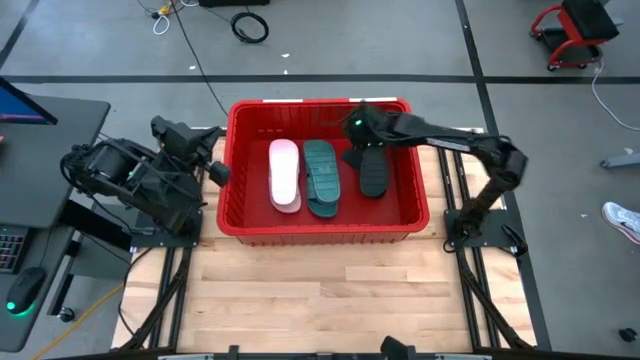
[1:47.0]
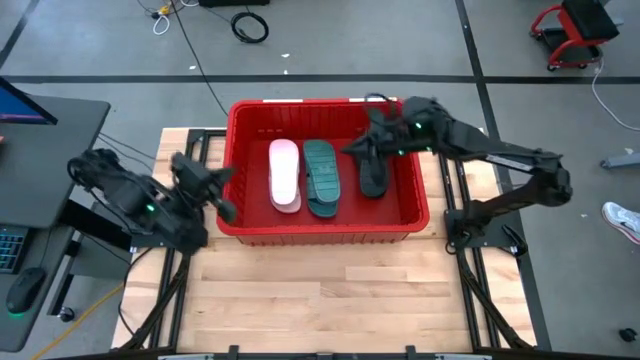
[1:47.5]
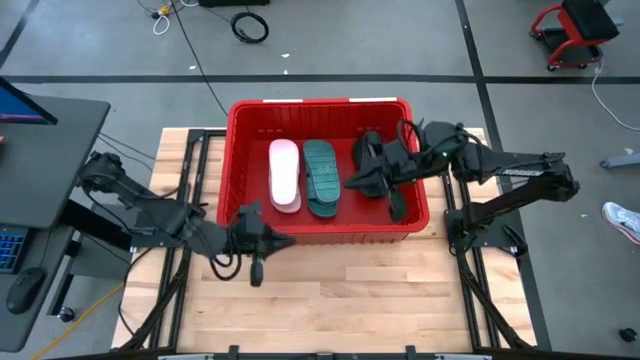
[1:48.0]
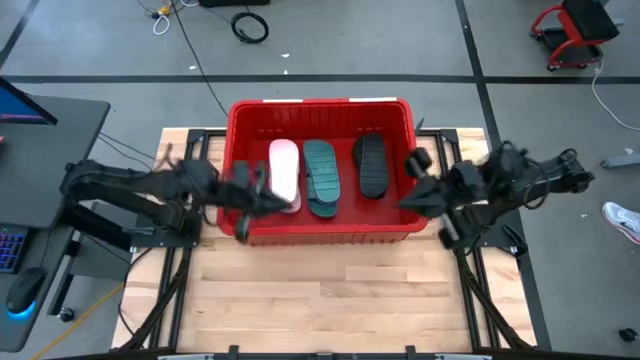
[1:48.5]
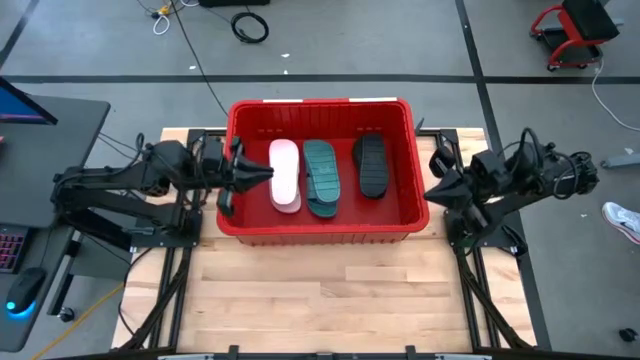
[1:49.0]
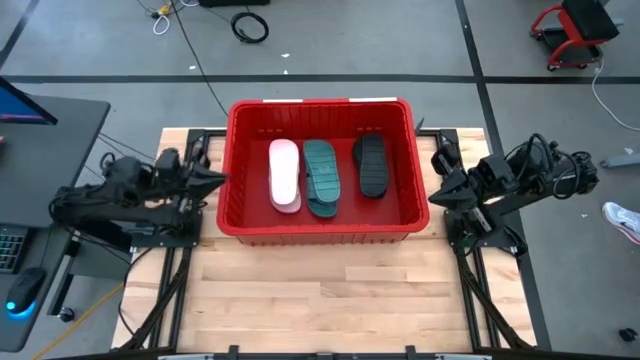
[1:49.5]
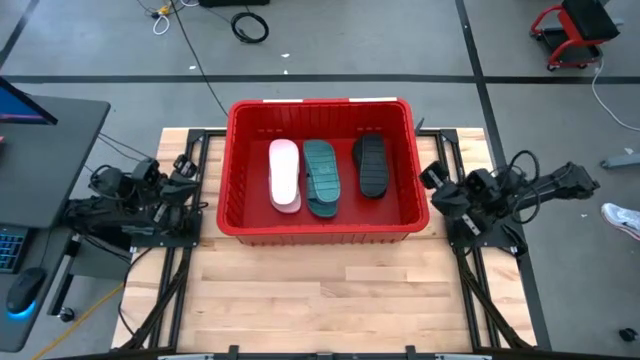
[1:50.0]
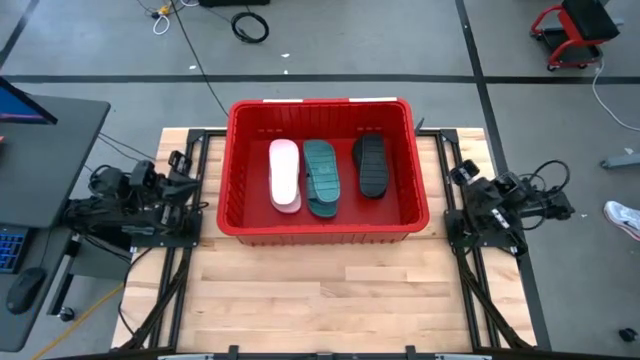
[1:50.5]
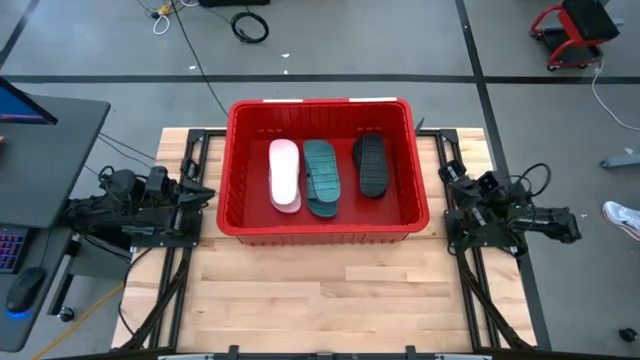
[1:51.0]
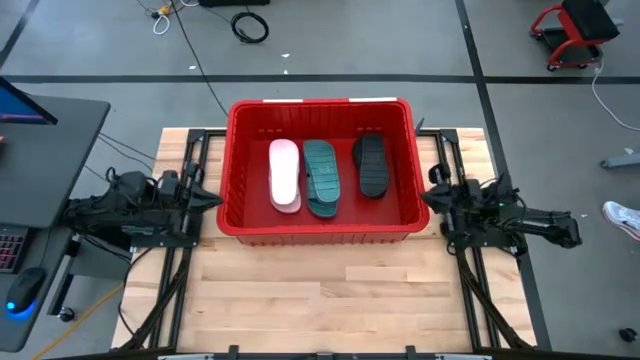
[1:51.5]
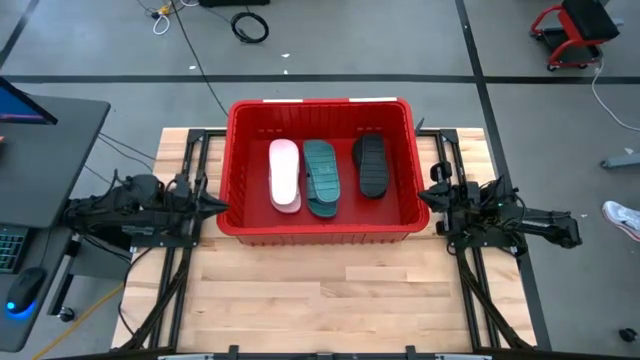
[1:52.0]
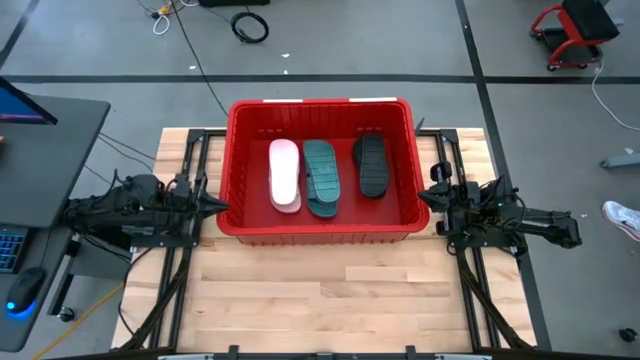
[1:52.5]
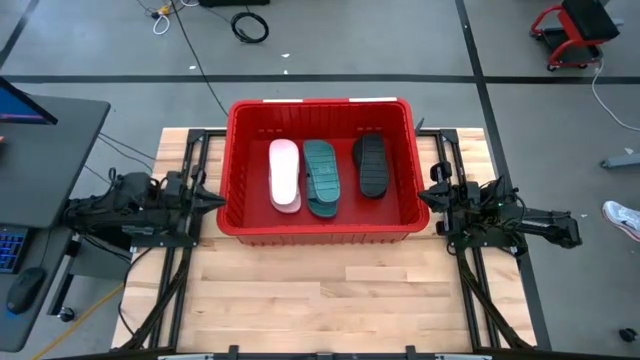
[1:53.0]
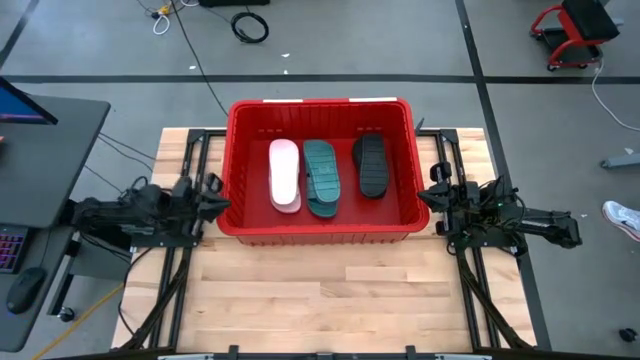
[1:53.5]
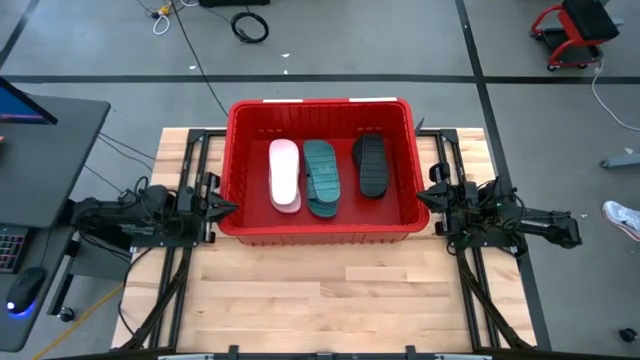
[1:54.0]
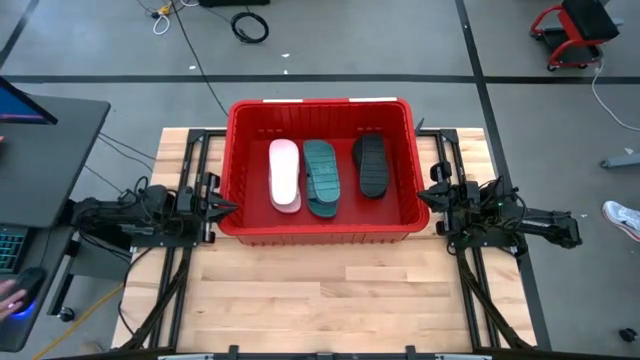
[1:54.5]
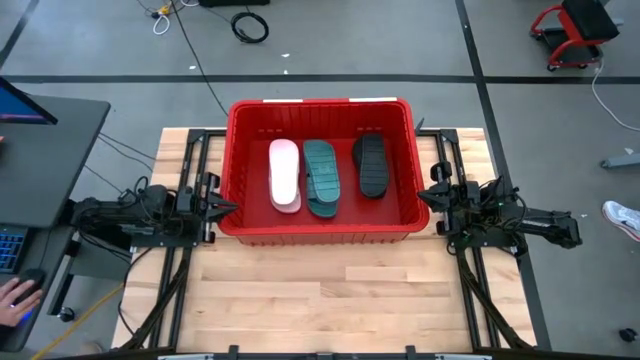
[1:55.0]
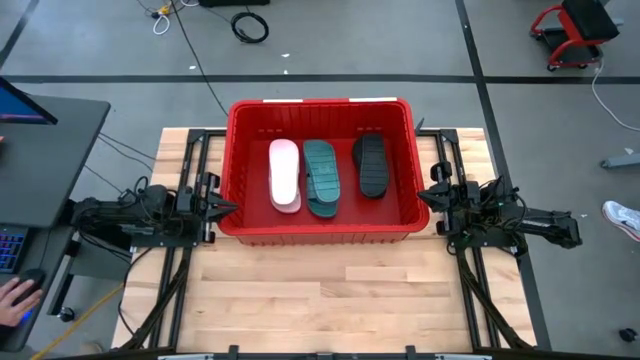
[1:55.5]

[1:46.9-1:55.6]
Task: Pick and place slides into bin
Return to Home Position

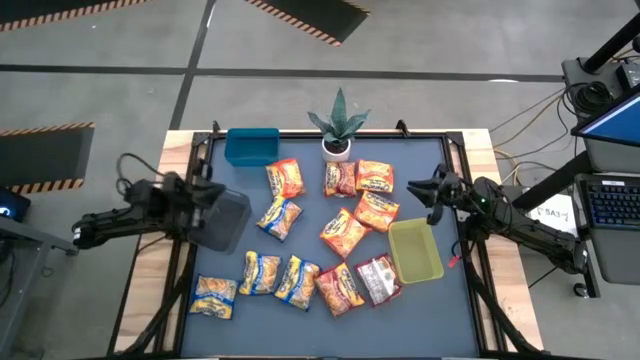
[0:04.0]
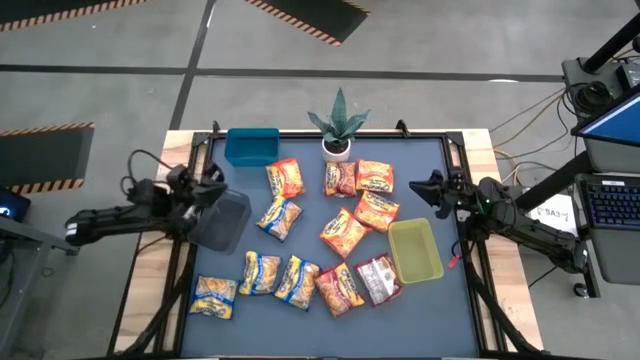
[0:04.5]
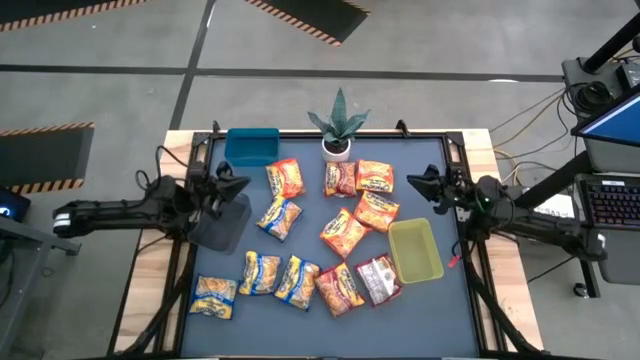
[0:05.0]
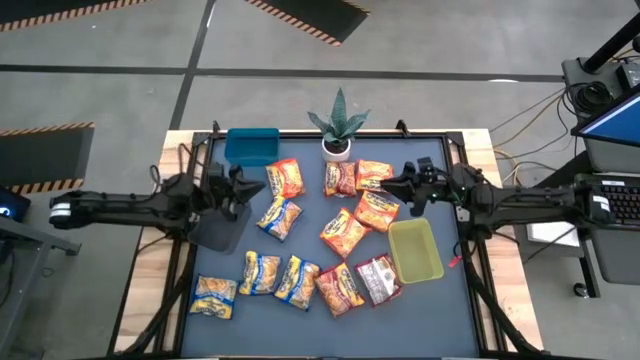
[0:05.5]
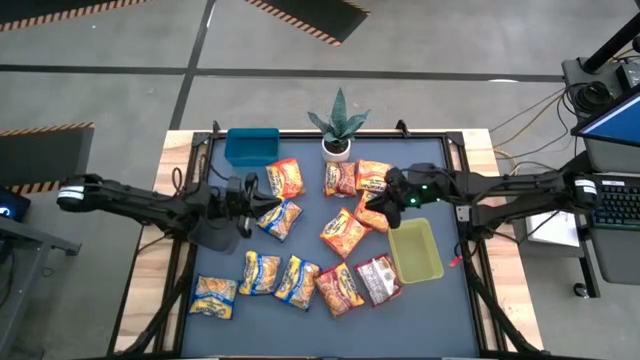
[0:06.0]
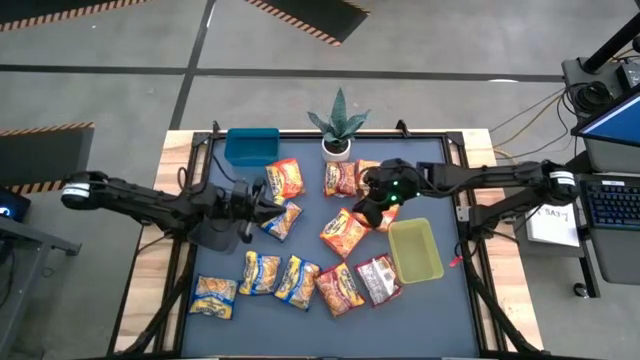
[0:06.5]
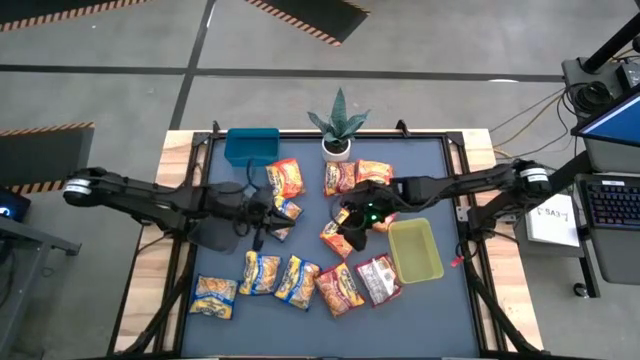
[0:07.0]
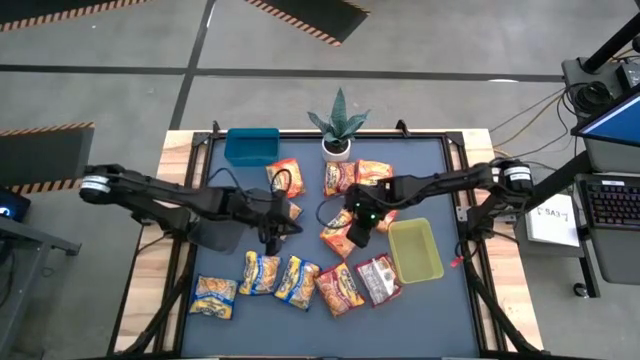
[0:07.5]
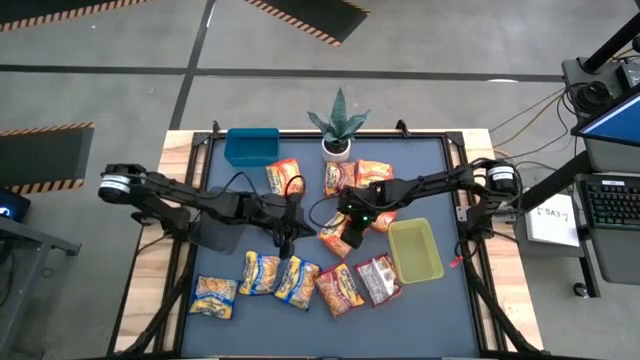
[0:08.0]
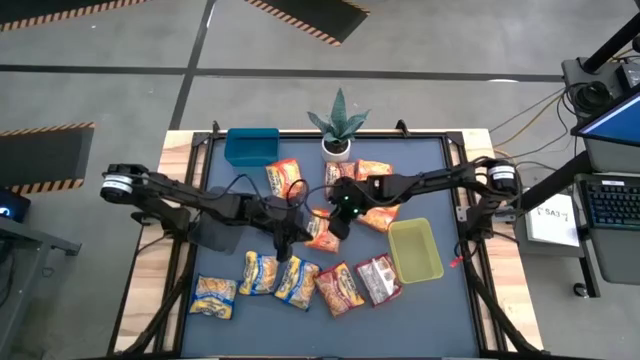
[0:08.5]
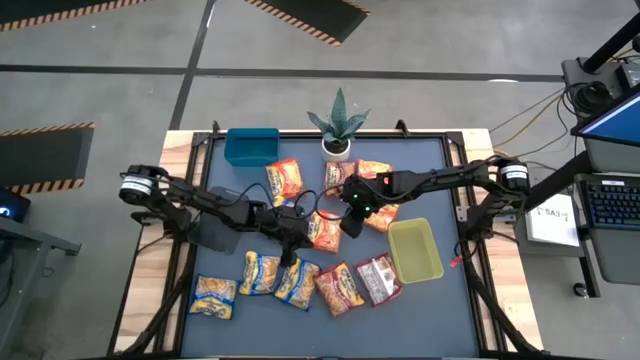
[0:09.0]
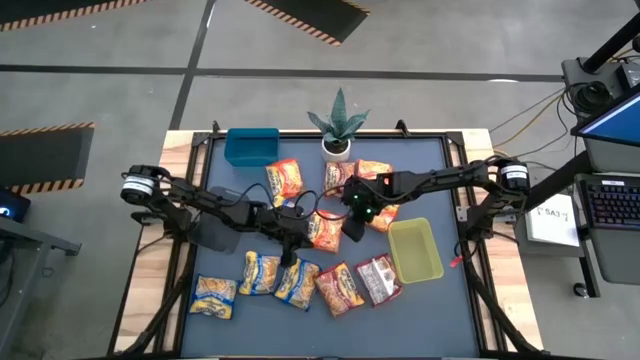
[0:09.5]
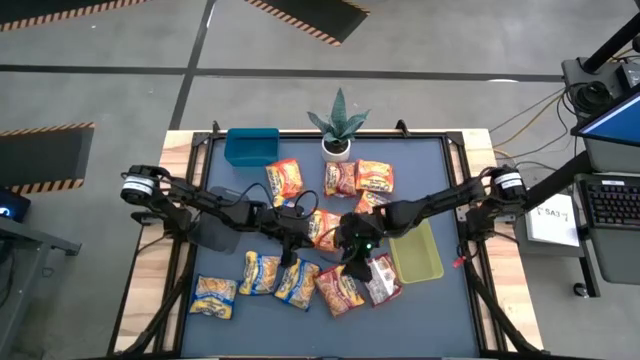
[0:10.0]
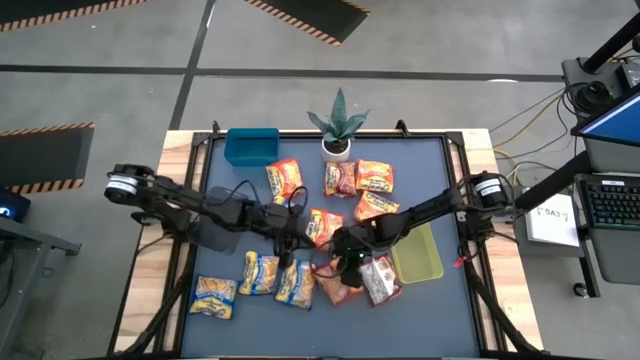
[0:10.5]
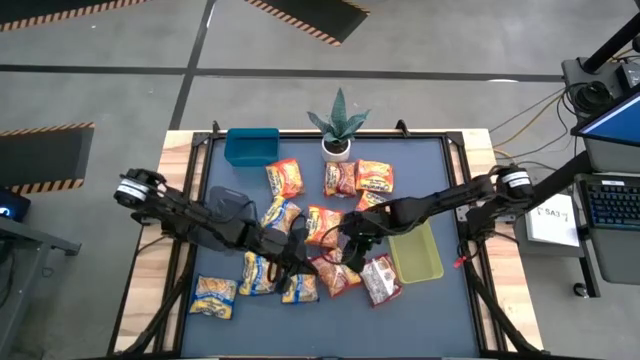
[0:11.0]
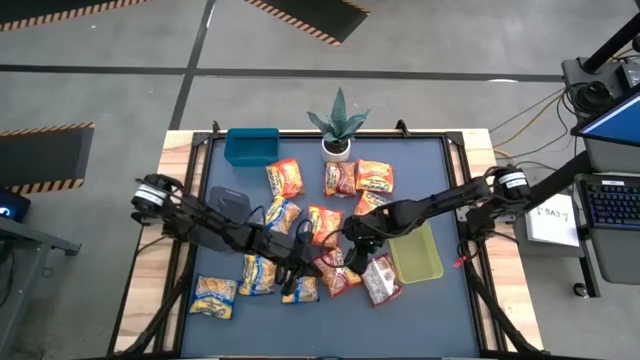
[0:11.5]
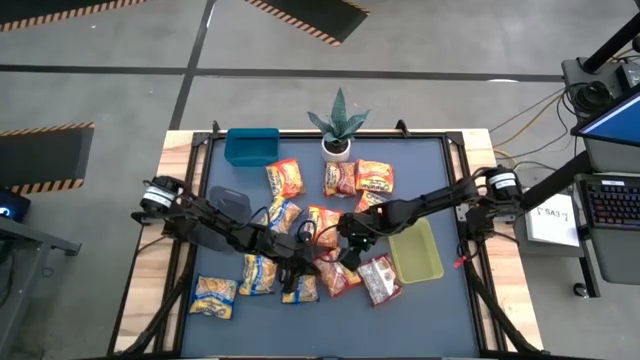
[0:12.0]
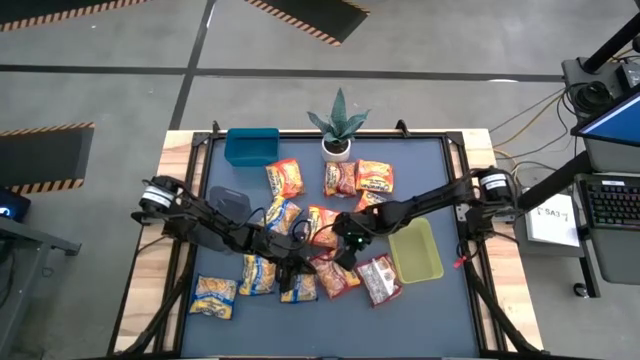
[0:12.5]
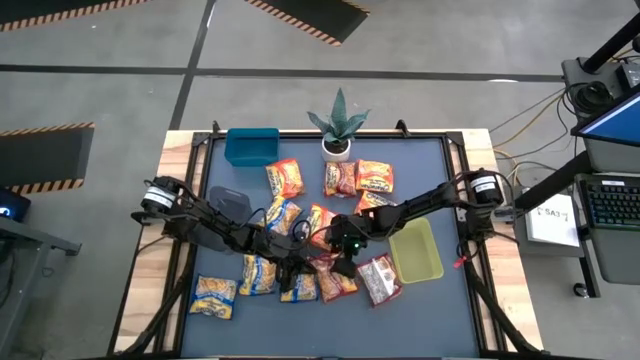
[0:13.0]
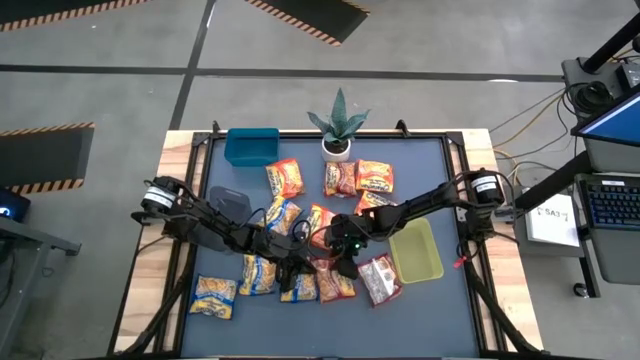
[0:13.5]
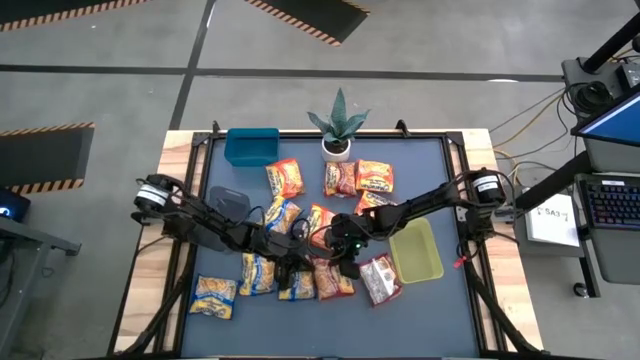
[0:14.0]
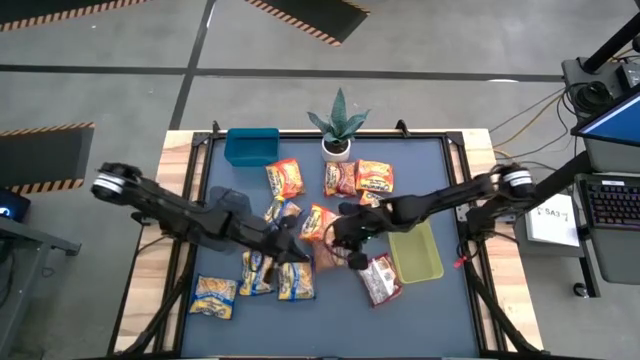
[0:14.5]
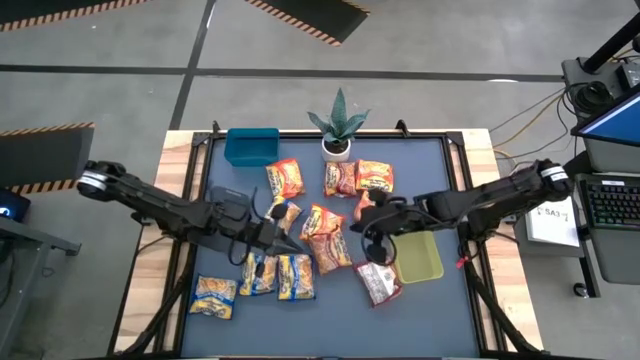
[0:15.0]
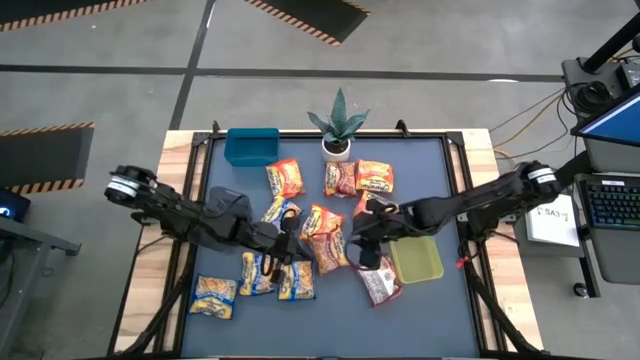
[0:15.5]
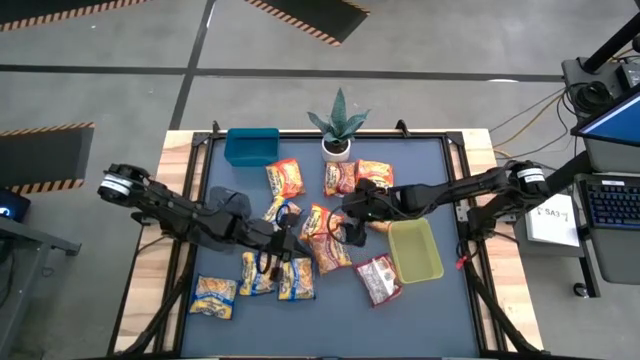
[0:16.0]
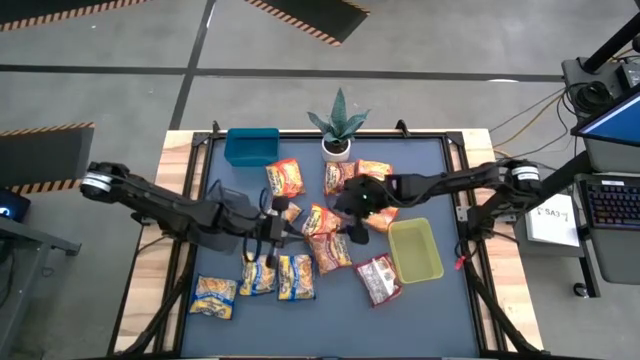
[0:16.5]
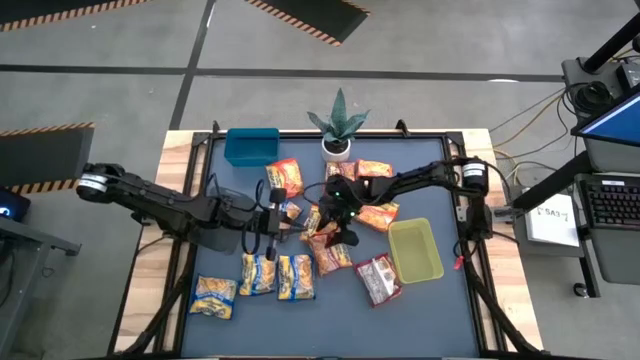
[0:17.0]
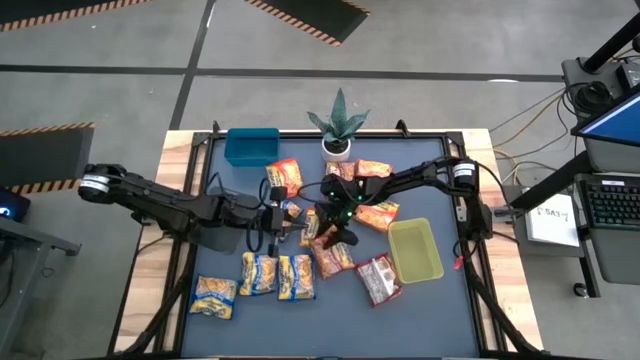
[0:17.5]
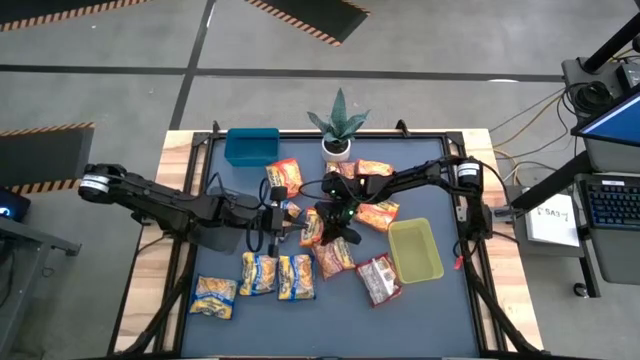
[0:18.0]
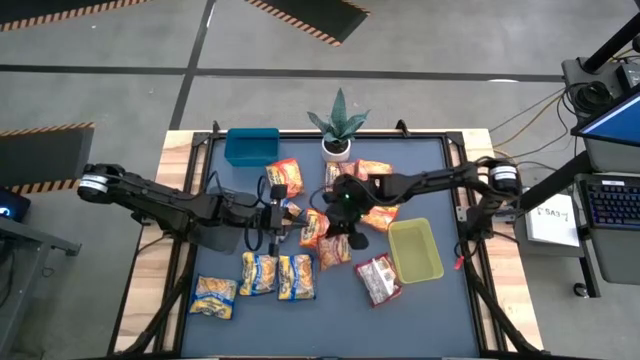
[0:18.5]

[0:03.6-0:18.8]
Task: Sort Maruchan noodles
Put the red noodle pack into the yellow bin
